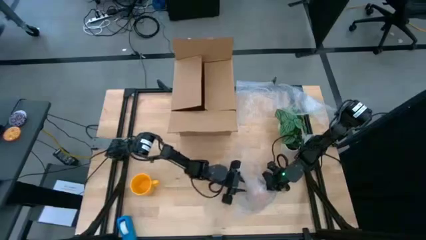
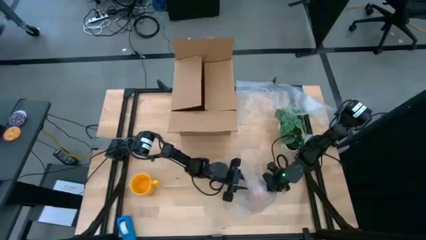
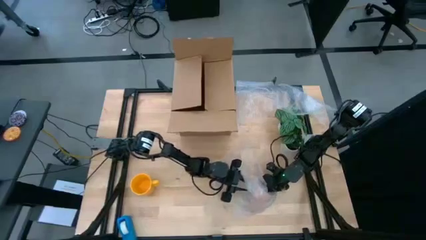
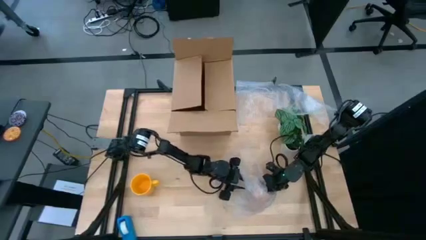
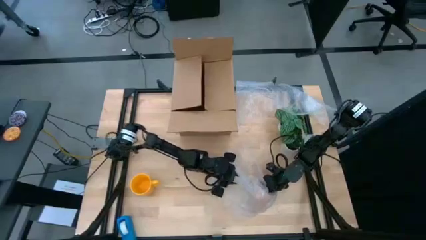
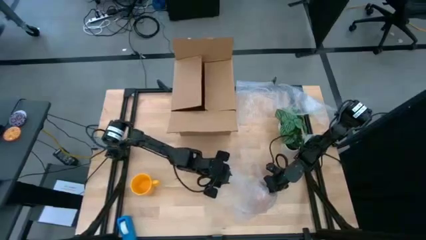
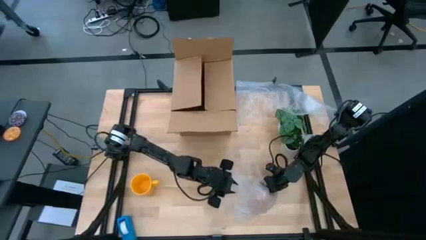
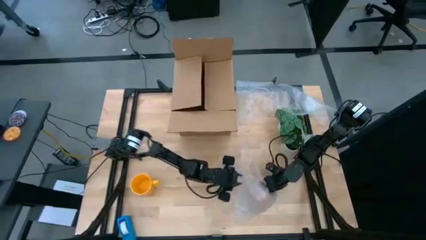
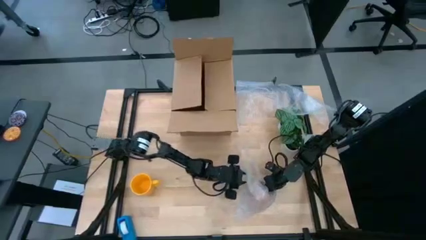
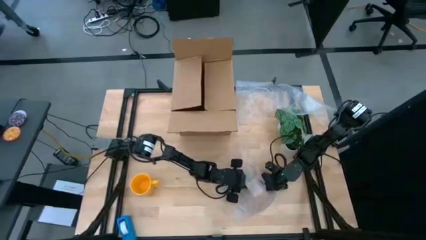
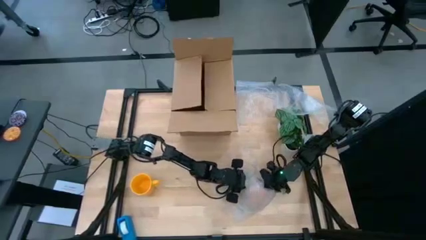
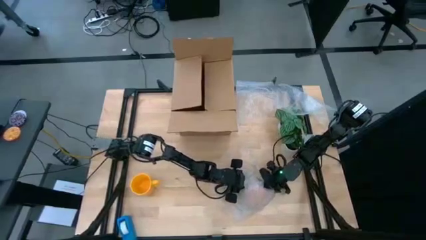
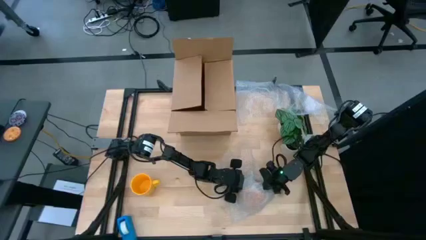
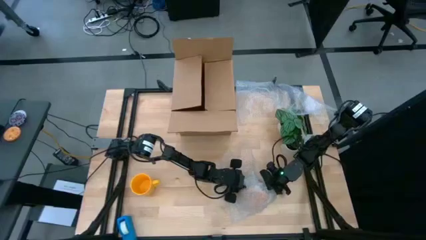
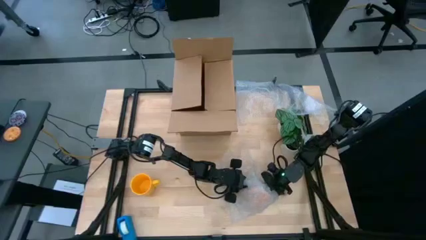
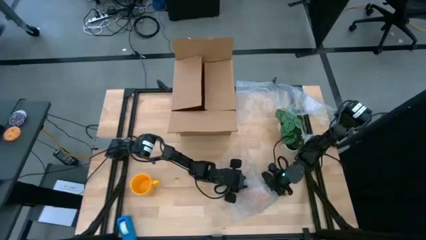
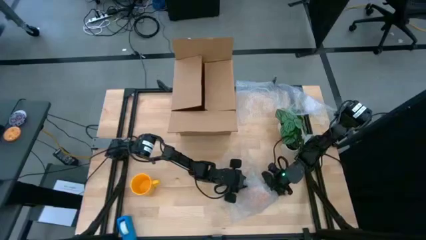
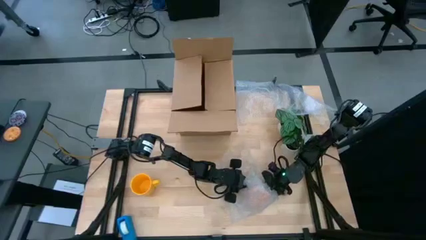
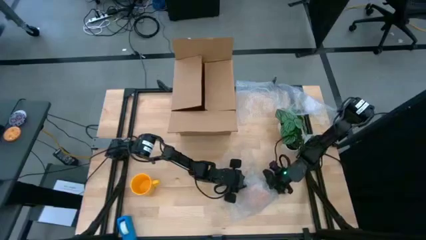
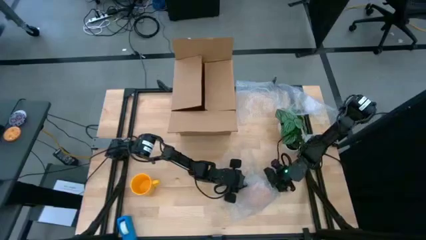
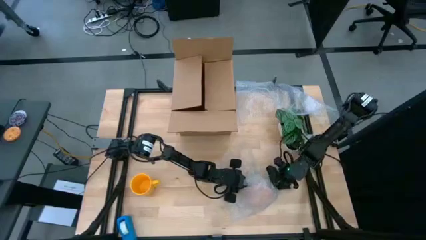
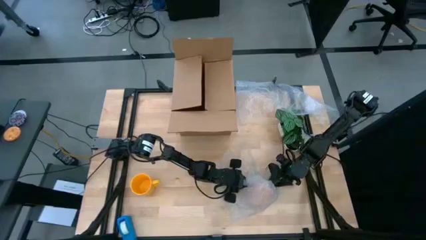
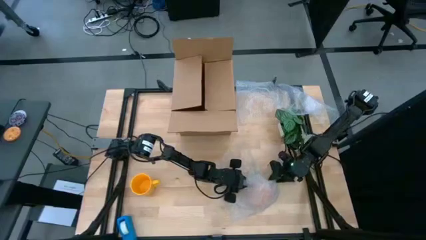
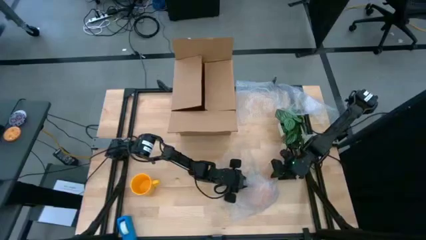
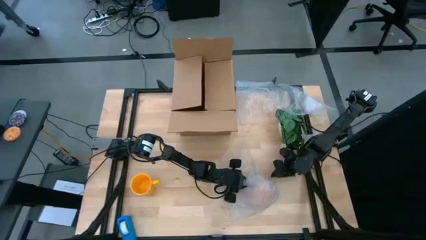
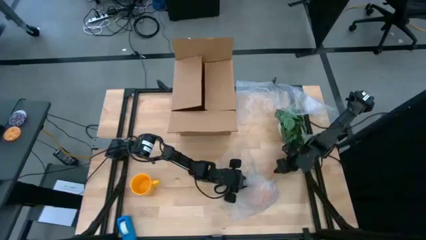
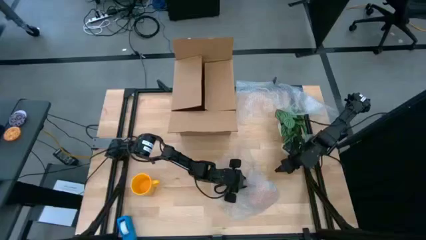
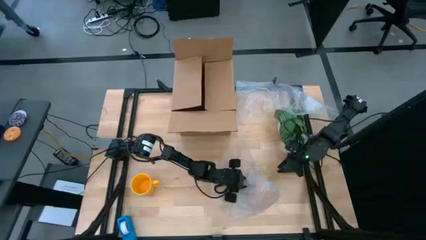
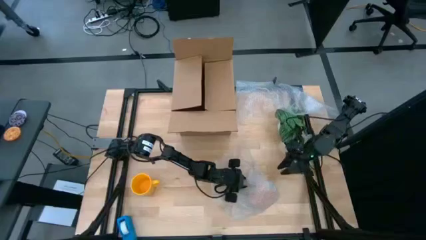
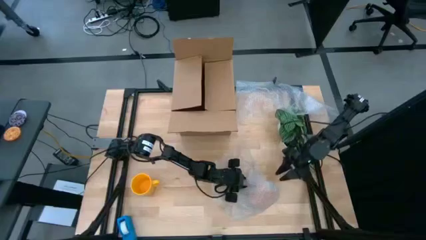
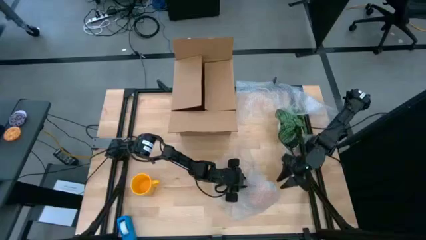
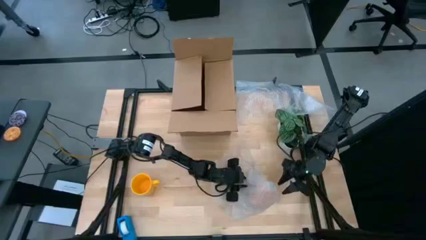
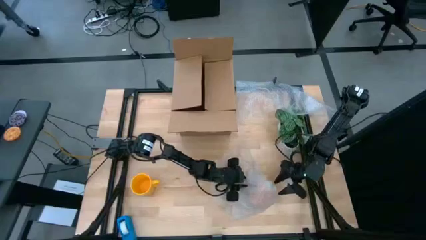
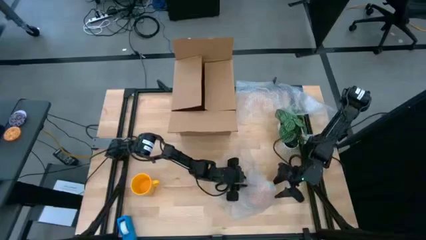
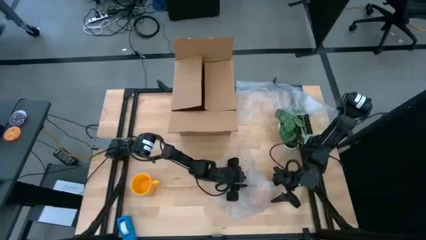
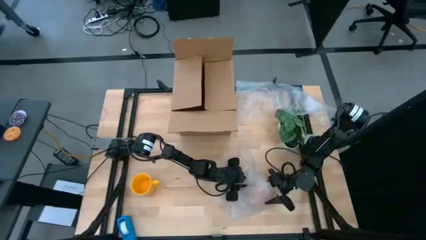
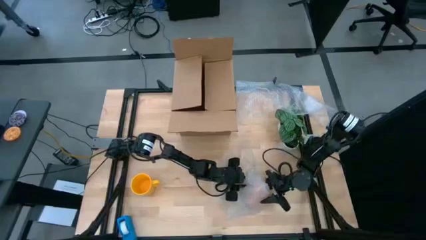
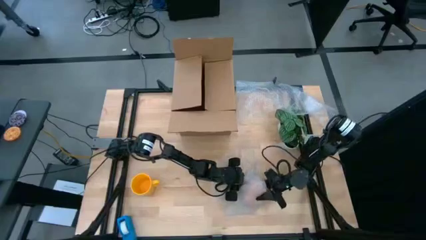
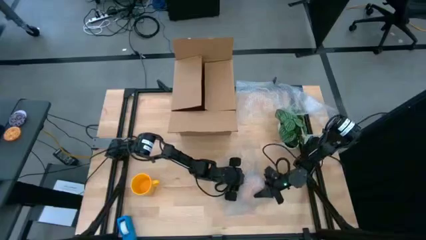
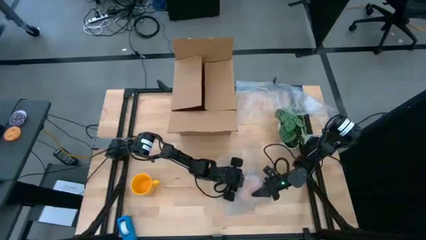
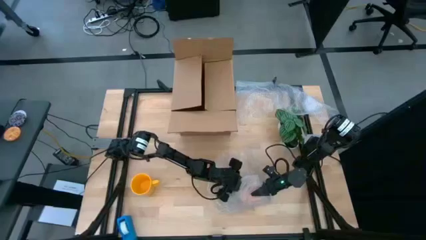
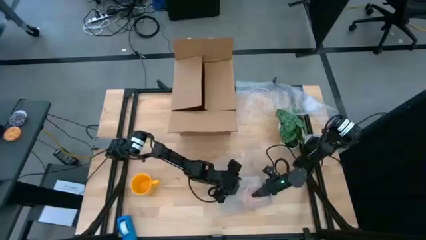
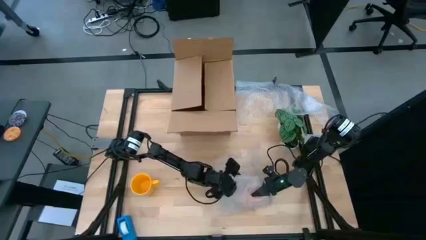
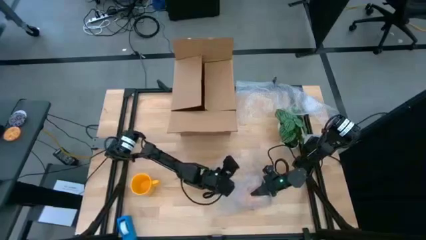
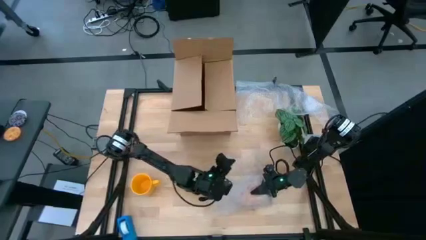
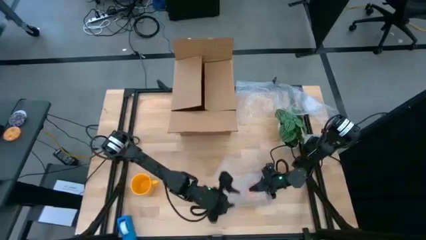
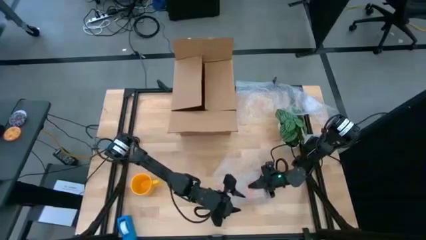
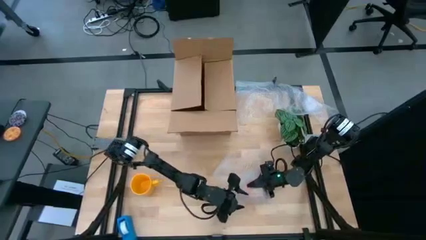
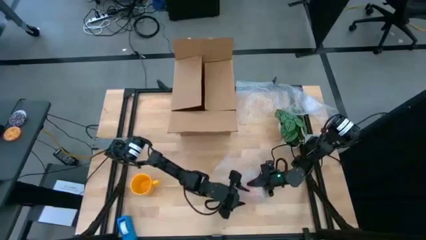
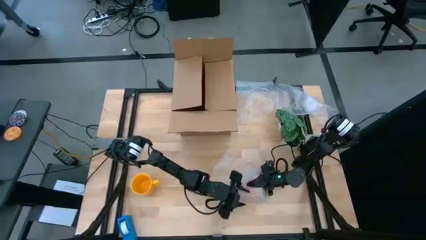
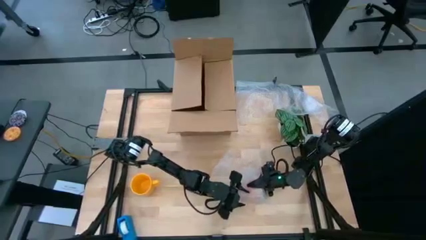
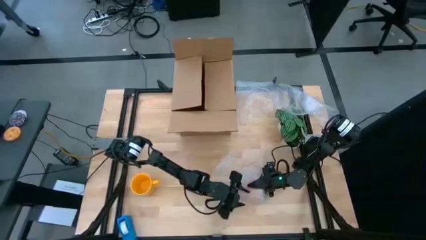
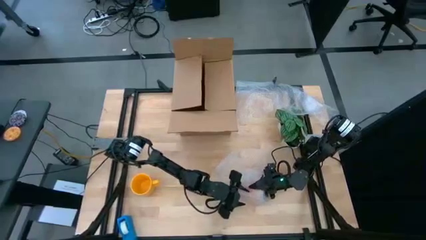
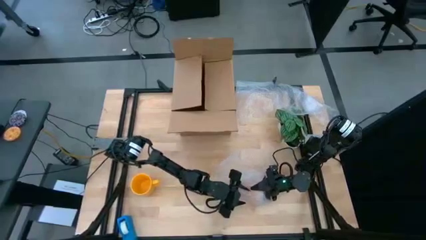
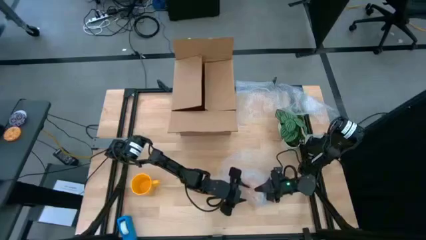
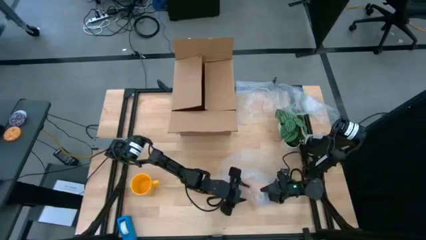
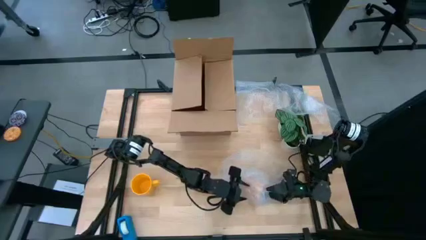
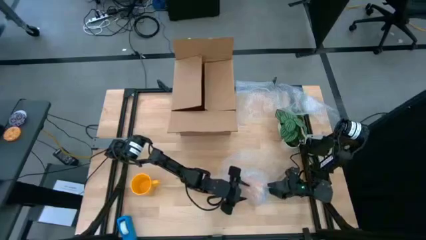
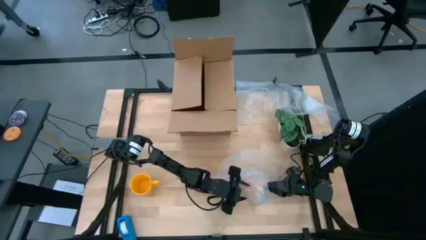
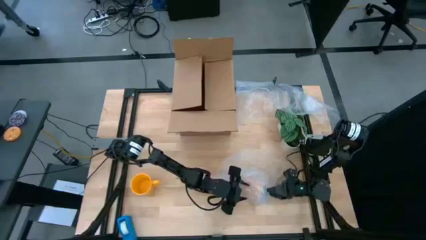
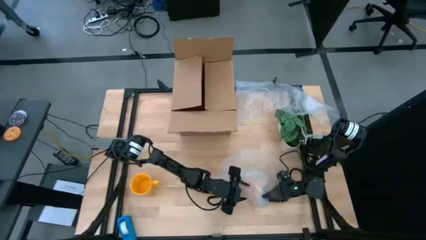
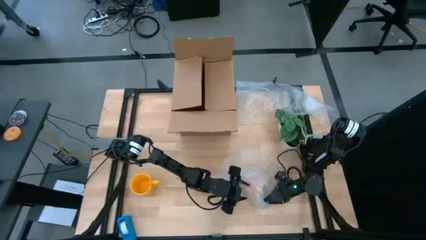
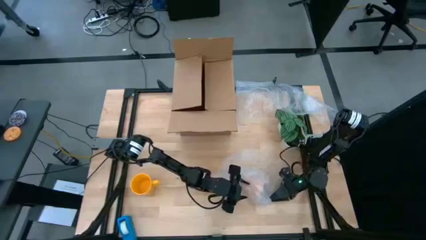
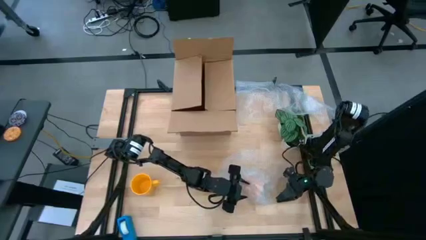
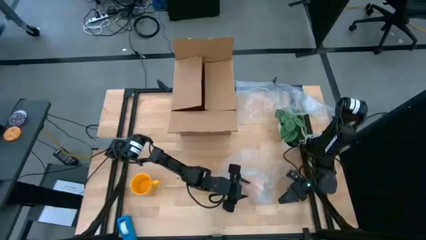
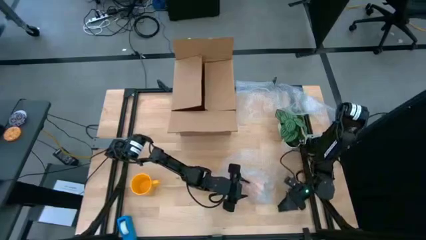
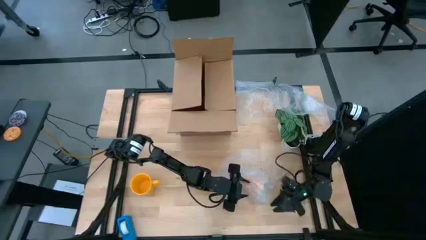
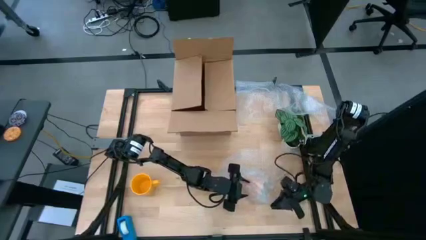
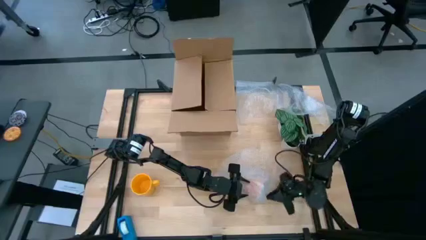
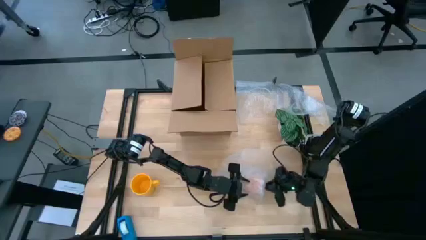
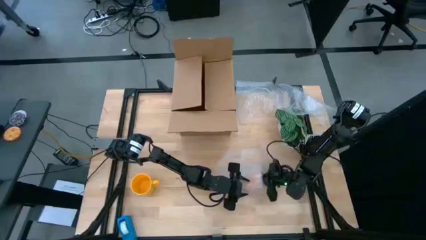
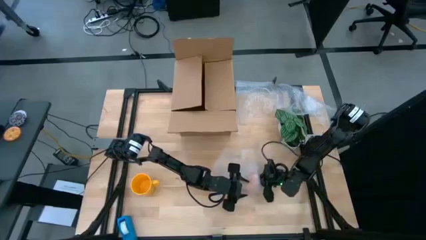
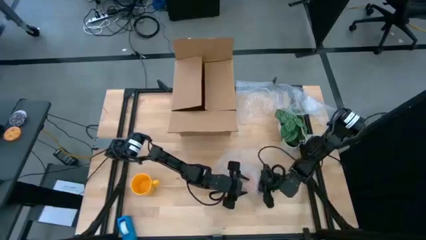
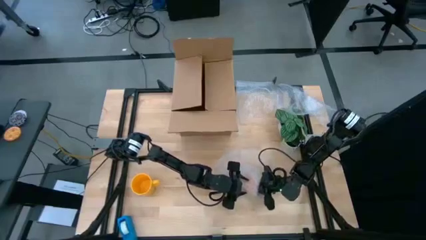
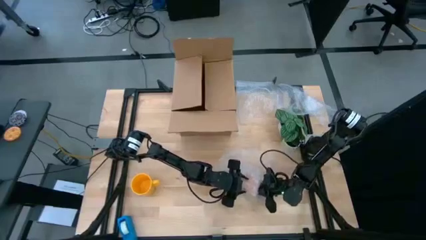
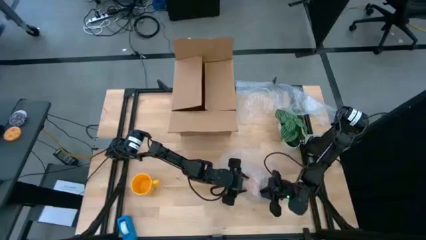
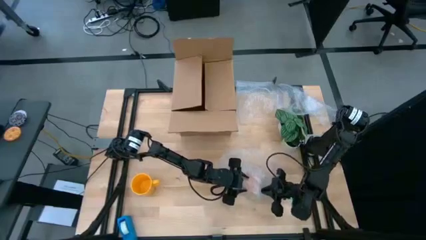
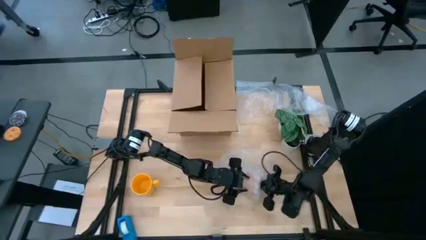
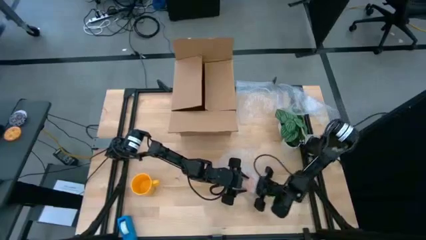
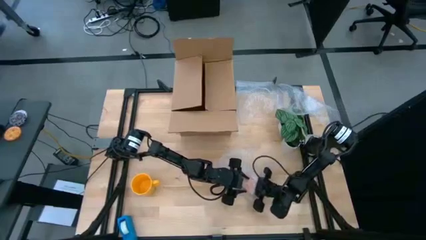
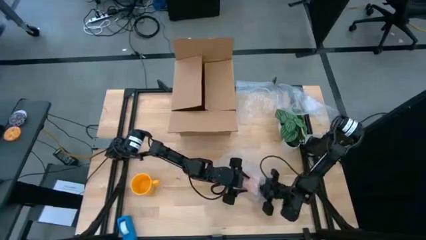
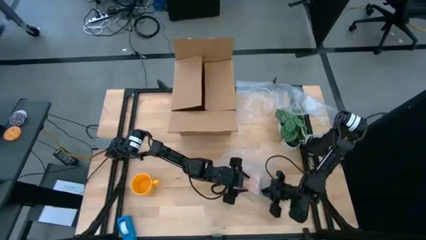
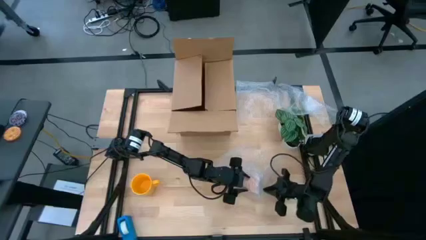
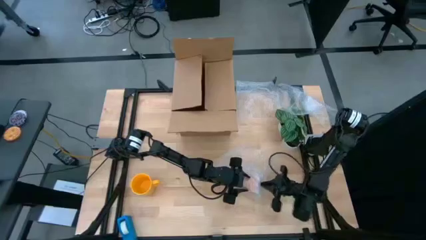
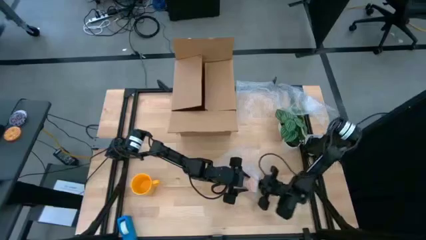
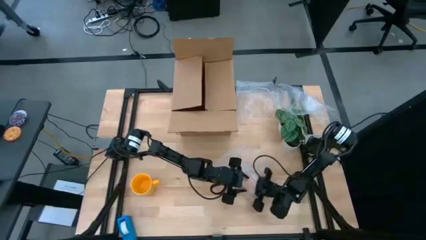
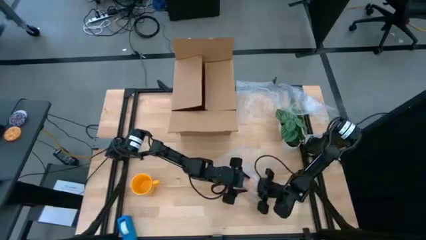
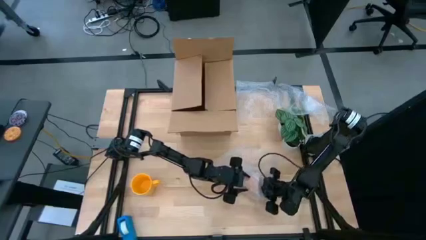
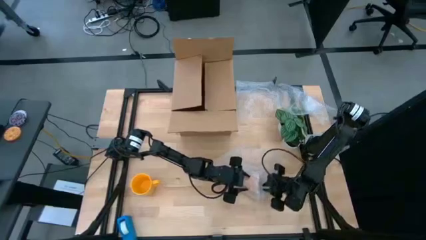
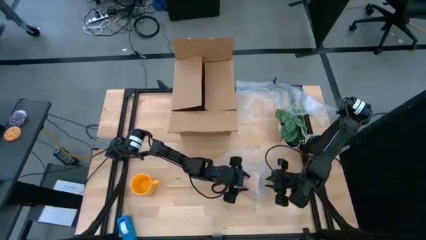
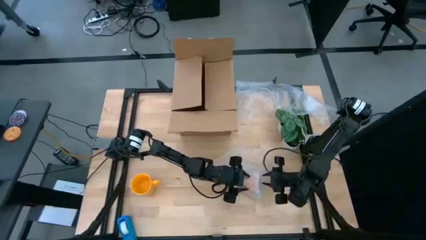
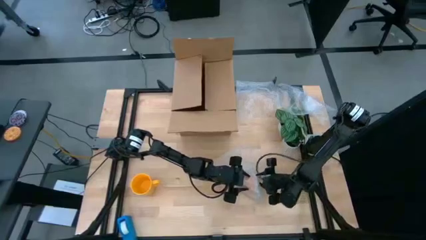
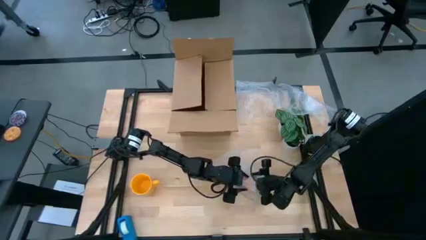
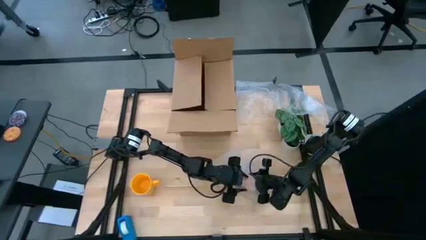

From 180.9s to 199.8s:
Task: wrap mug
Wrap the orange cup with the bubble wrap
